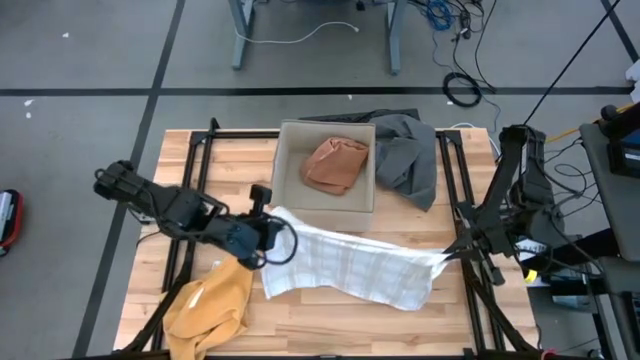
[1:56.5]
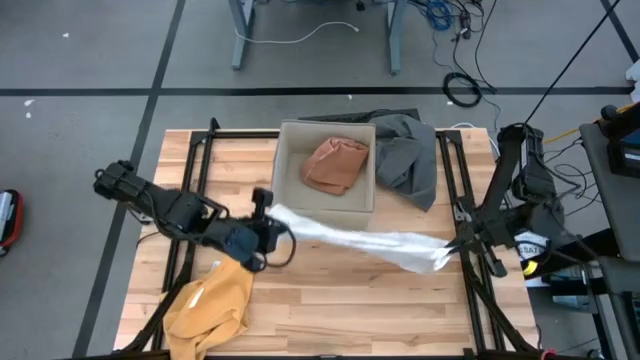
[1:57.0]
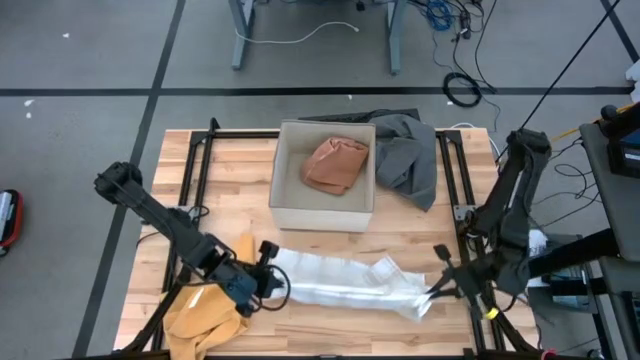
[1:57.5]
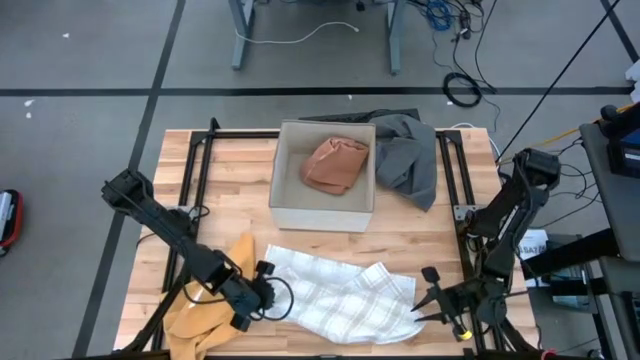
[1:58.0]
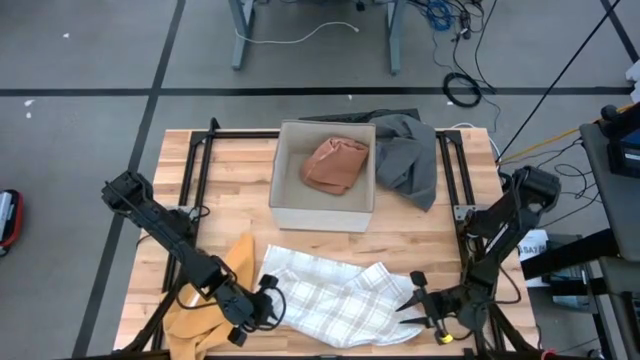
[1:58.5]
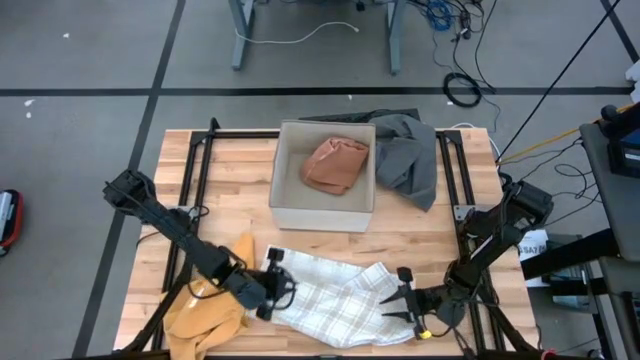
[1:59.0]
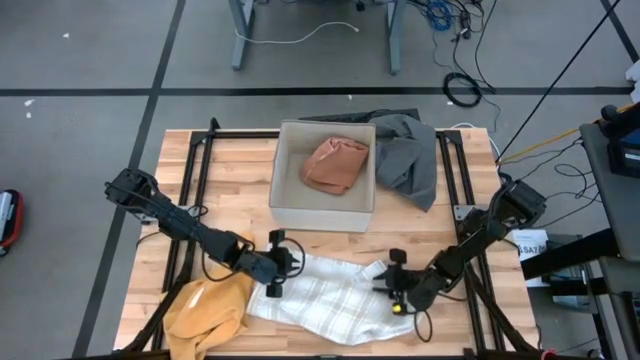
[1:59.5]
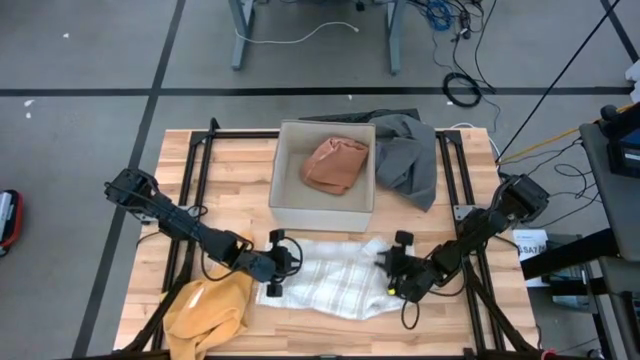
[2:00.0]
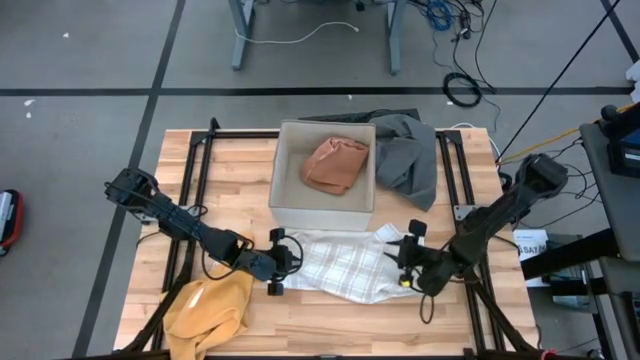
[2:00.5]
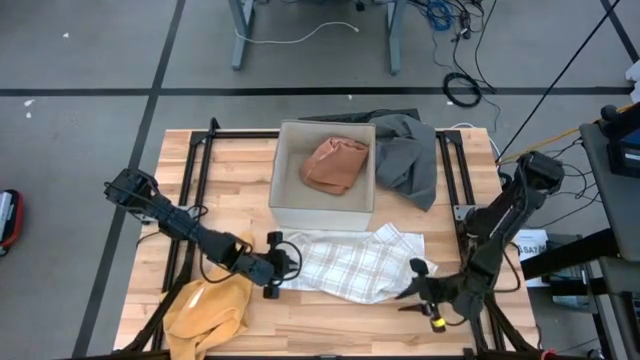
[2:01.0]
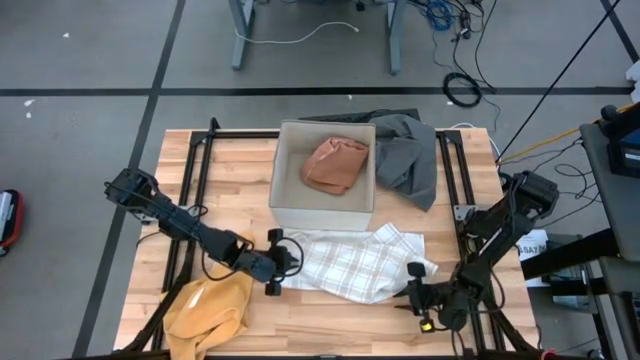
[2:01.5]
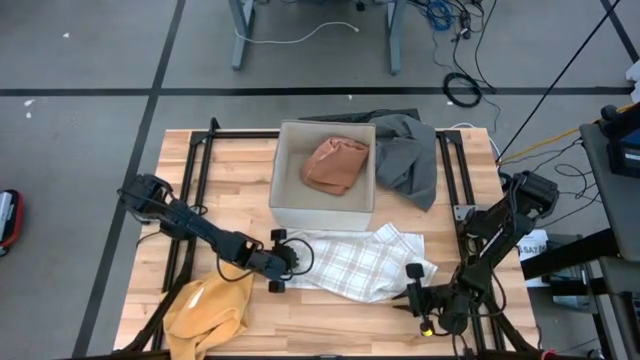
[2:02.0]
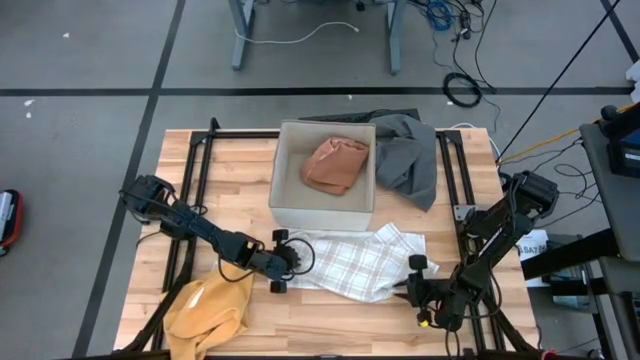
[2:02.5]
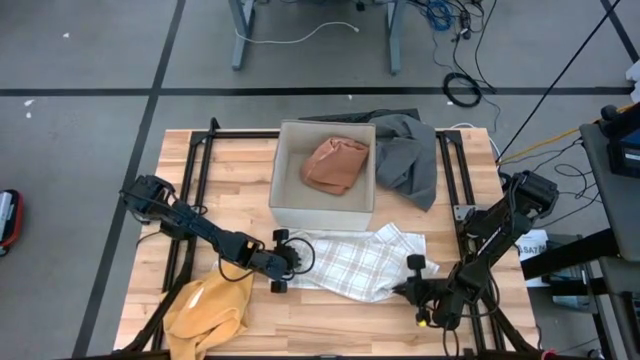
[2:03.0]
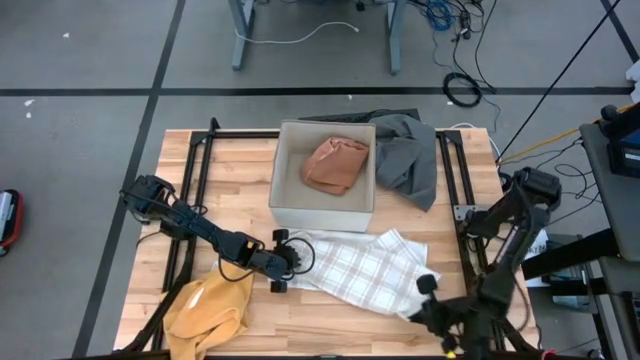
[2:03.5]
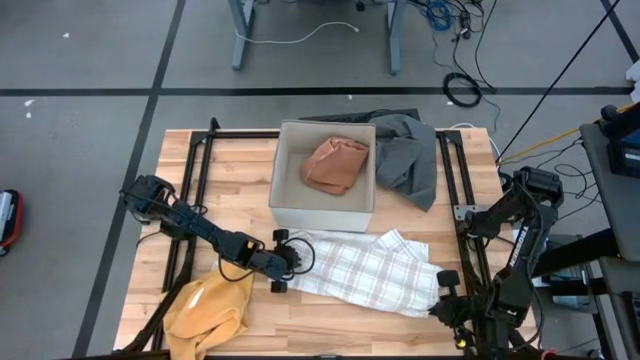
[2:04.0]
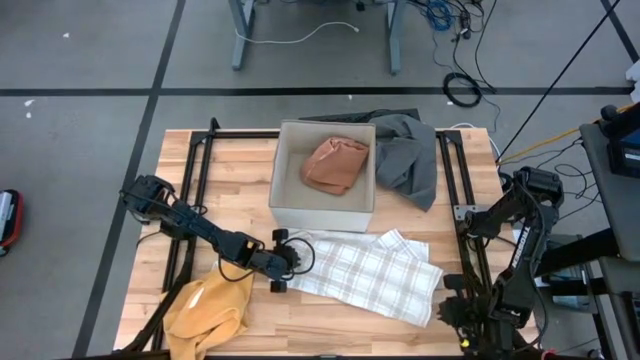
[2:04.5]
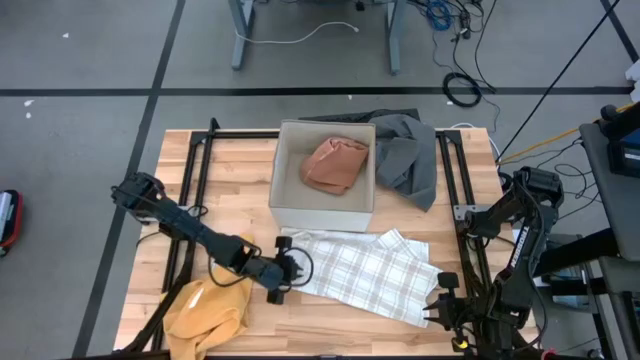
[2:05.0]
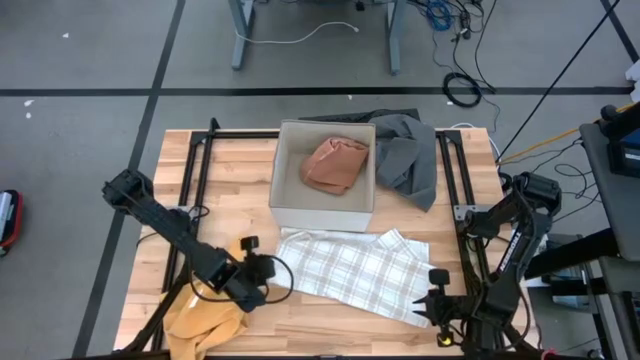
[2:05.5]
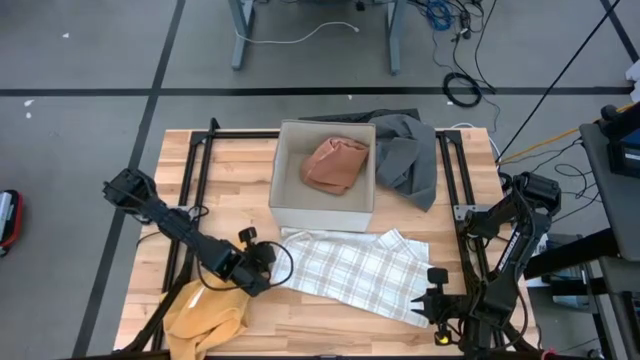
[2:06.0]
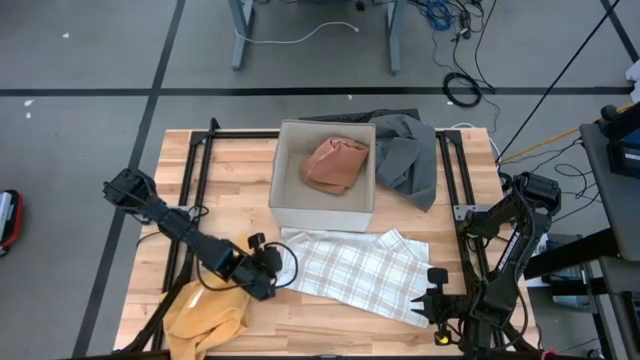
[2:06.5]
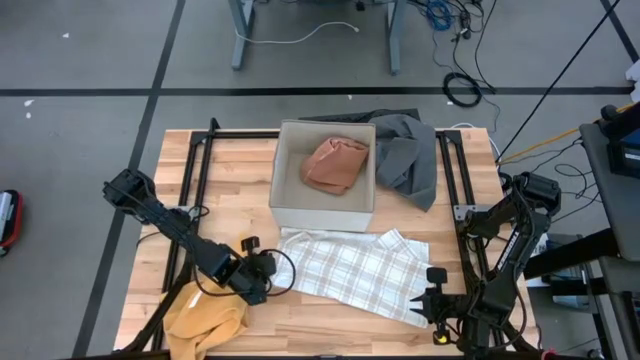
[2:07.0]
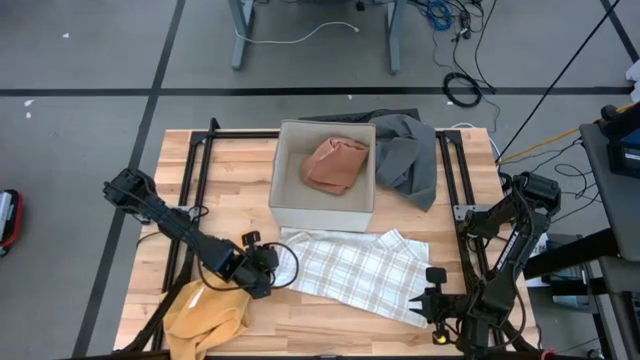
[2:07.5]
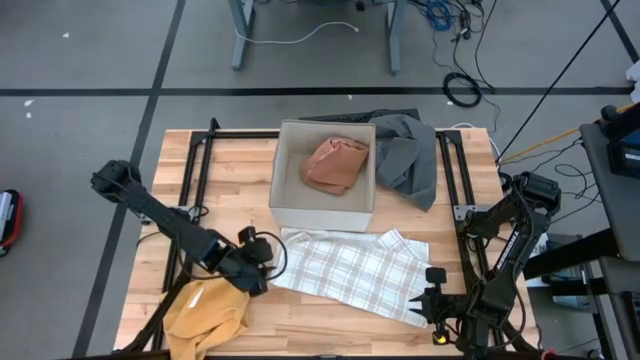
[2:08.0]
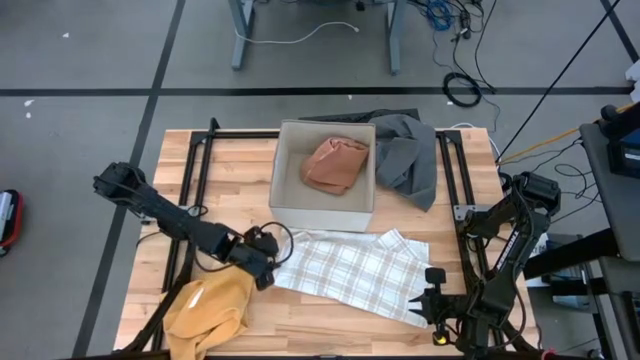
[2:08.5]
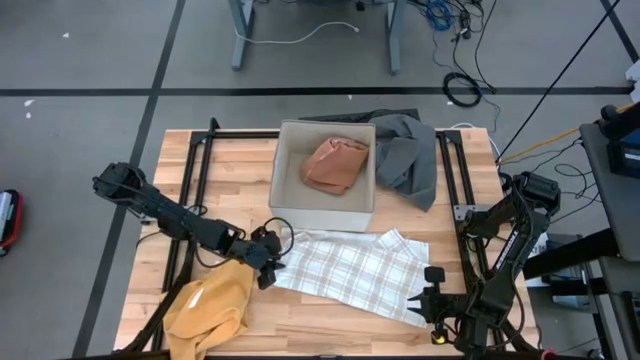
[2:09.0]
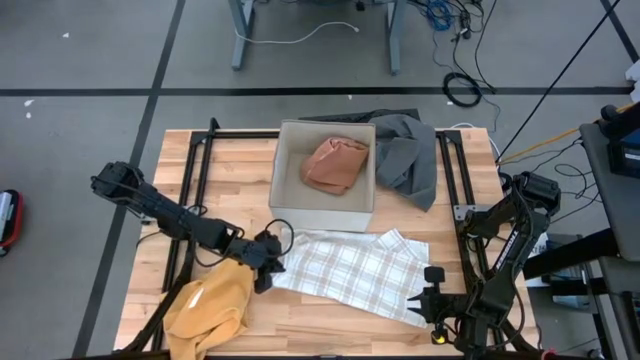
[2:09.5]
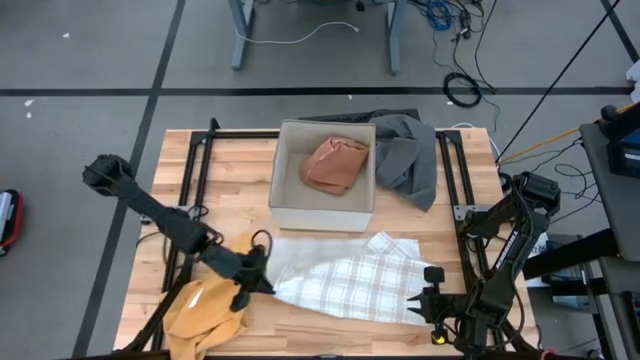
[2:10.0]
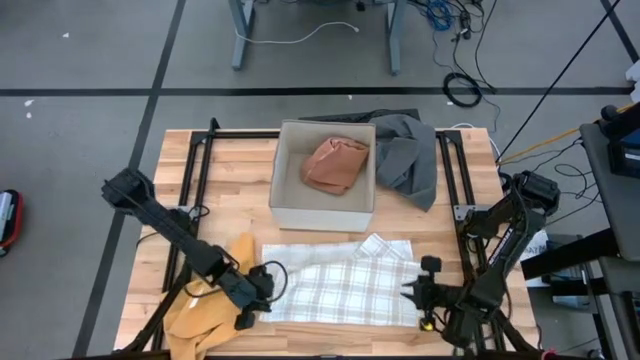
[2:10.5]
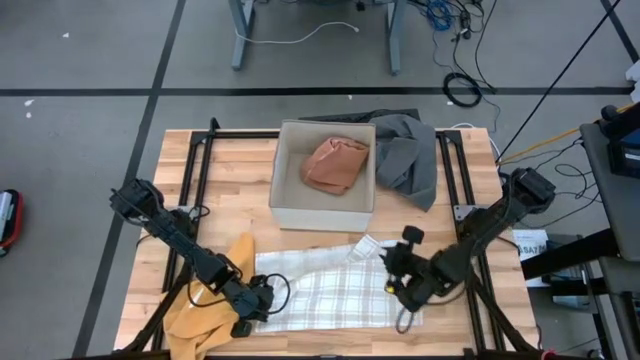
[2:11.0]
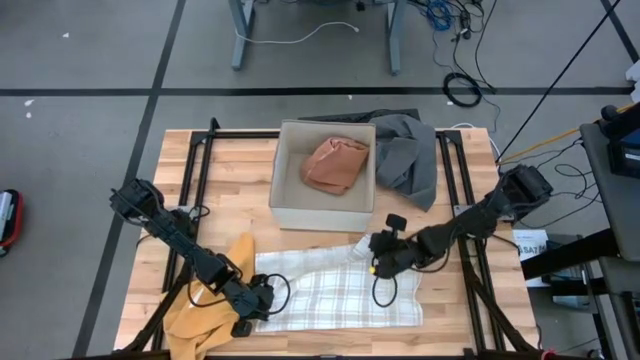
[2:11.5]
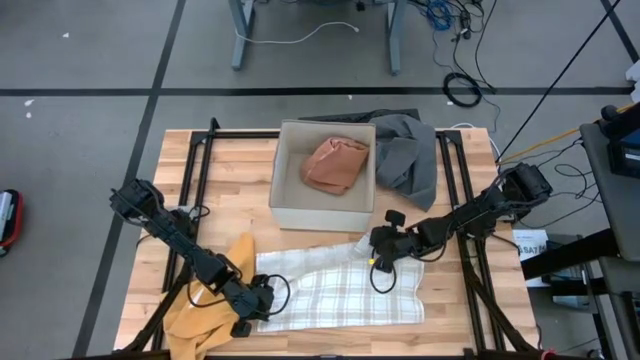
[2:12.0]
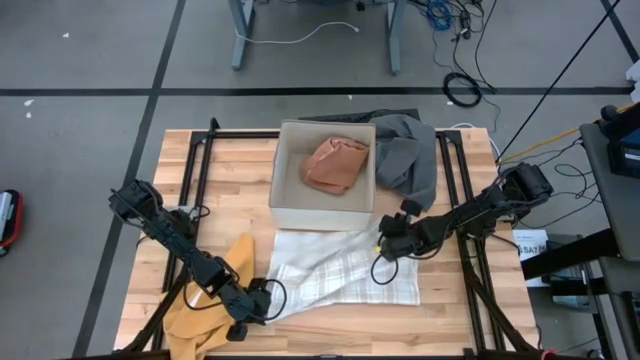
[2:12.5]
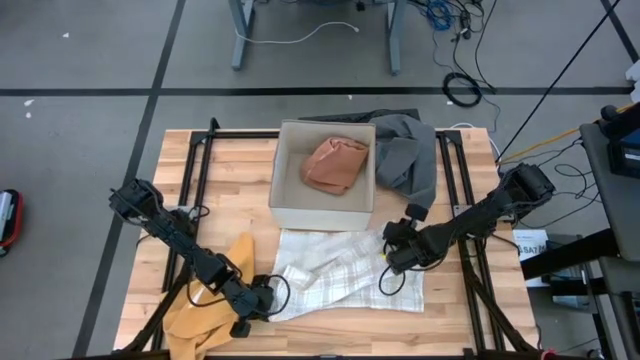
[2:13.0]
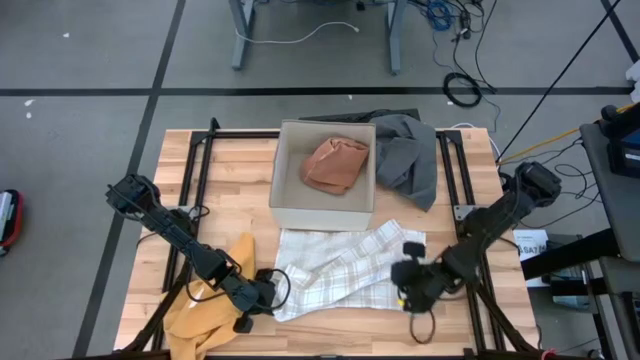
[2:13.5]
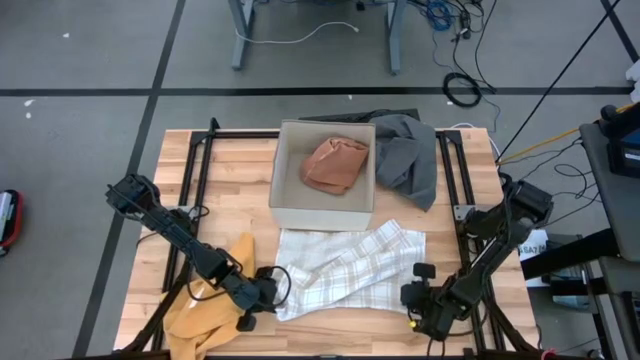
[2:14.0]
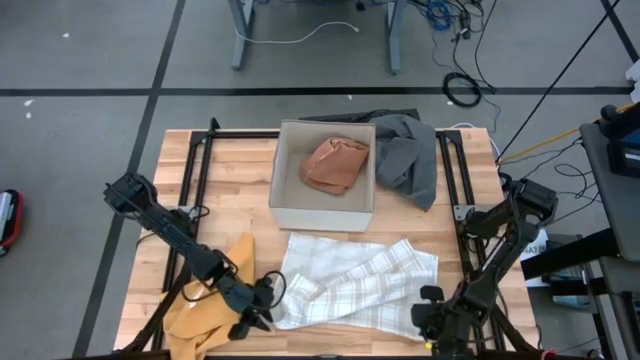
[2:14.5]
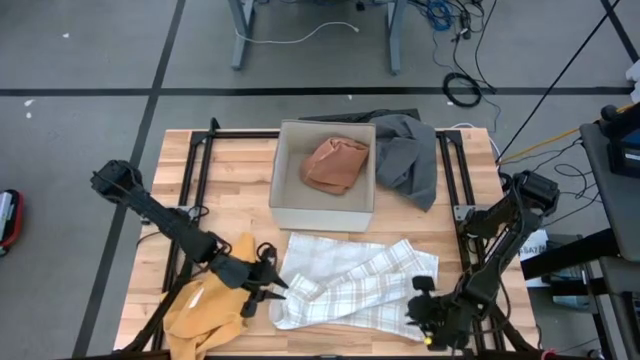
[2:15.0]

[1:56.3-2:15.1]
Task: Fold towel
Fold the white towel
